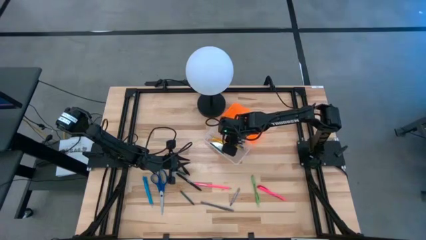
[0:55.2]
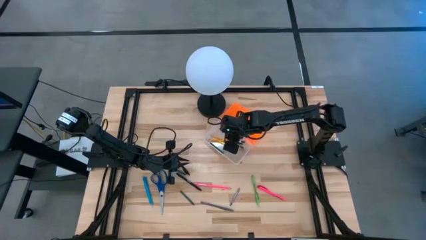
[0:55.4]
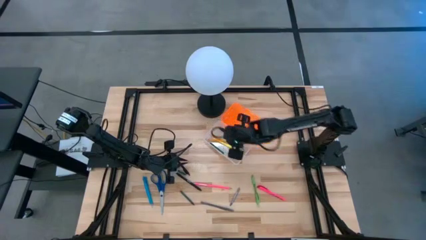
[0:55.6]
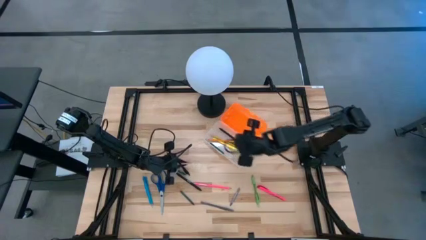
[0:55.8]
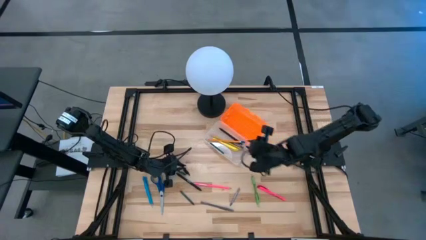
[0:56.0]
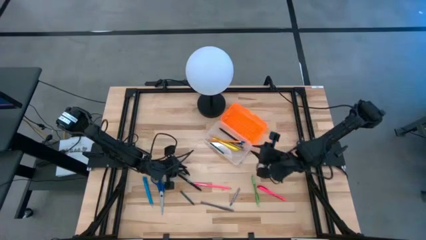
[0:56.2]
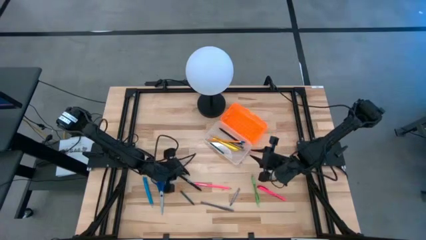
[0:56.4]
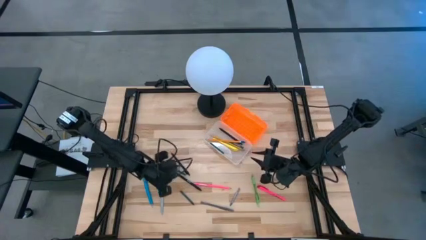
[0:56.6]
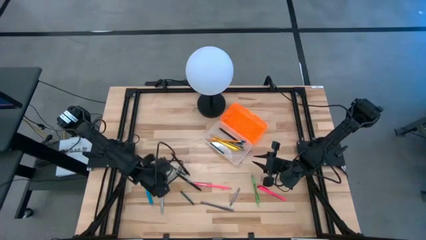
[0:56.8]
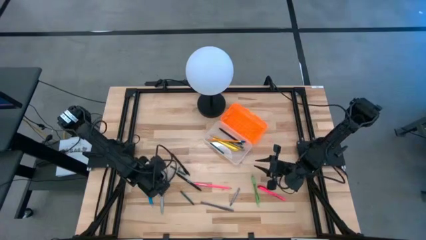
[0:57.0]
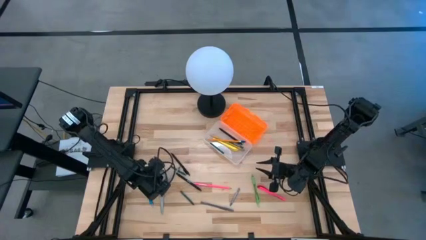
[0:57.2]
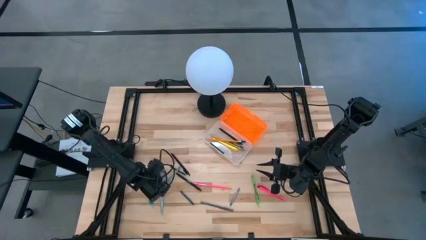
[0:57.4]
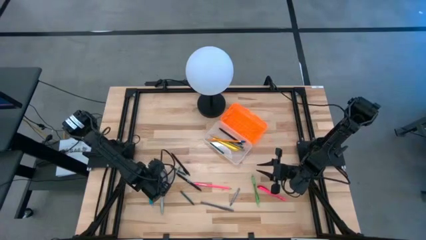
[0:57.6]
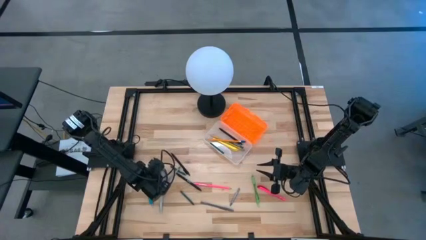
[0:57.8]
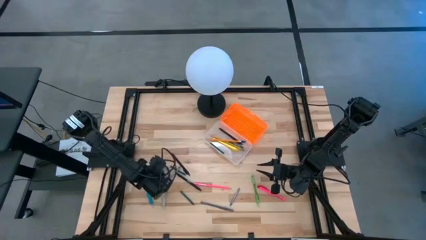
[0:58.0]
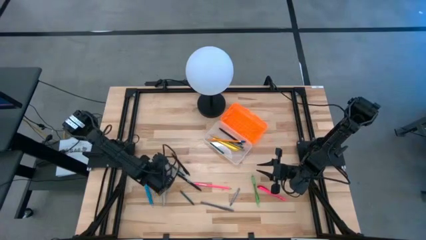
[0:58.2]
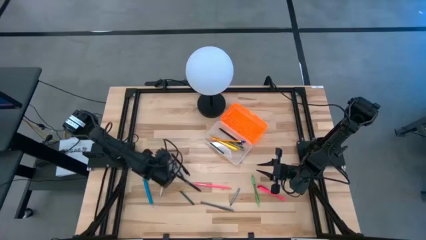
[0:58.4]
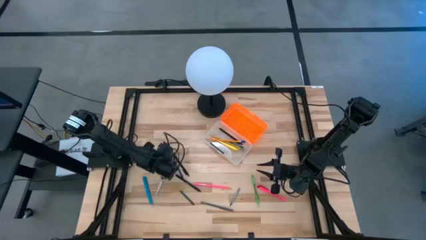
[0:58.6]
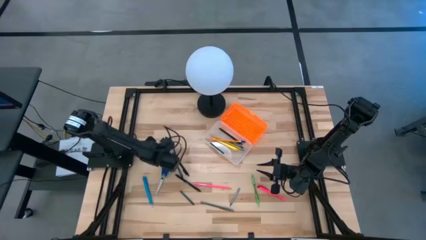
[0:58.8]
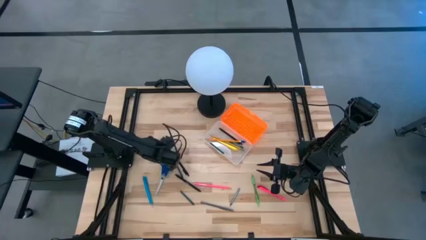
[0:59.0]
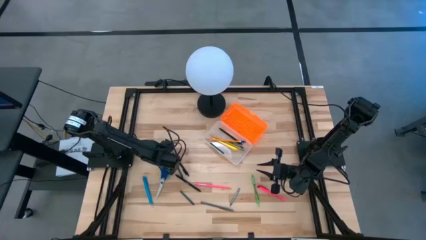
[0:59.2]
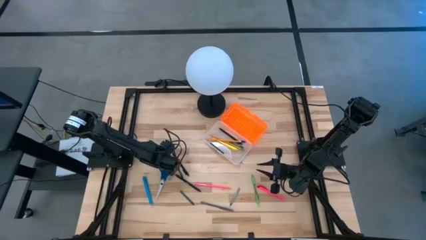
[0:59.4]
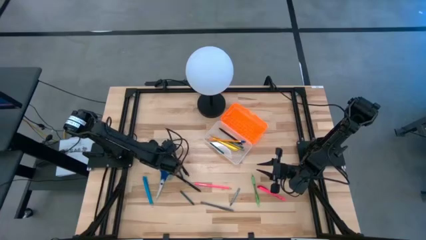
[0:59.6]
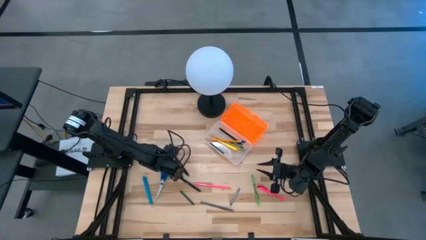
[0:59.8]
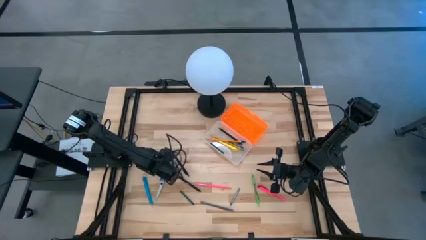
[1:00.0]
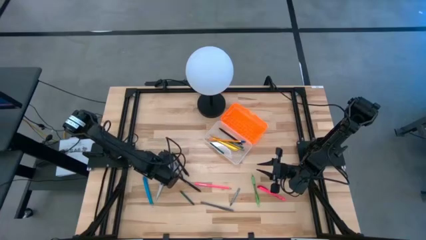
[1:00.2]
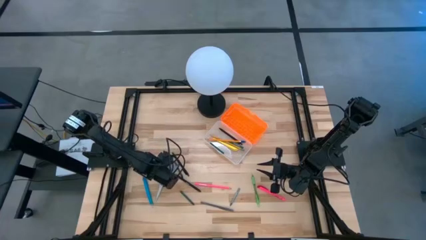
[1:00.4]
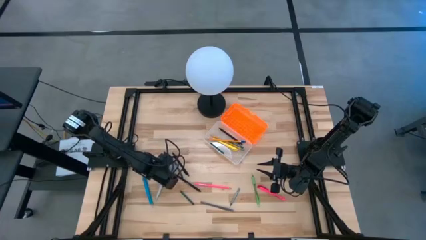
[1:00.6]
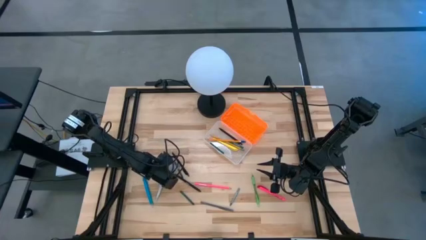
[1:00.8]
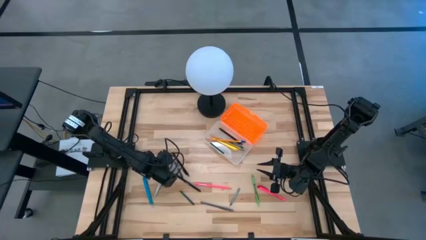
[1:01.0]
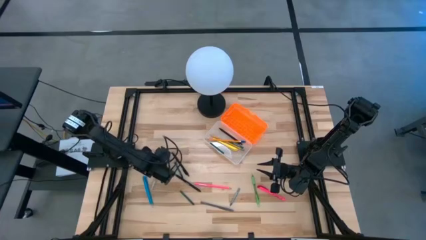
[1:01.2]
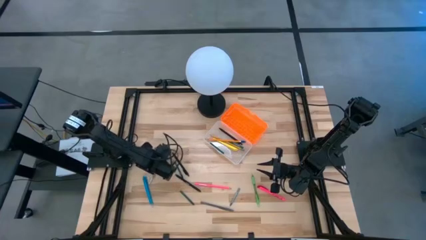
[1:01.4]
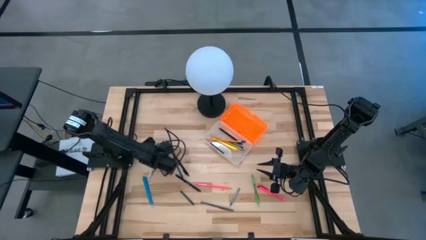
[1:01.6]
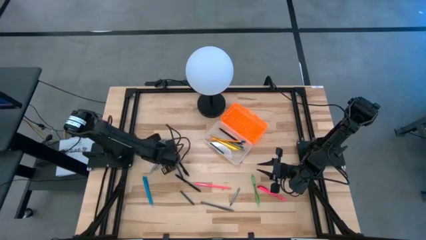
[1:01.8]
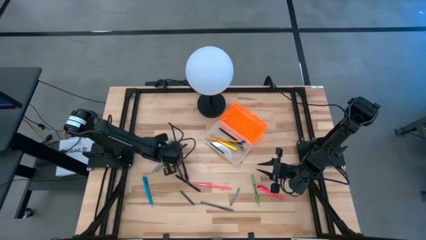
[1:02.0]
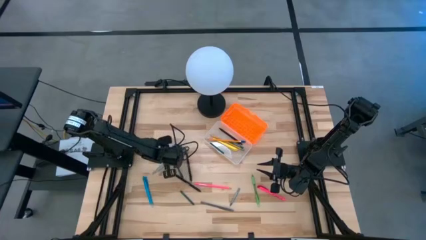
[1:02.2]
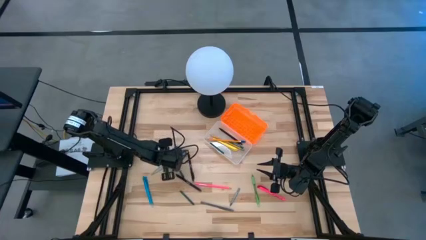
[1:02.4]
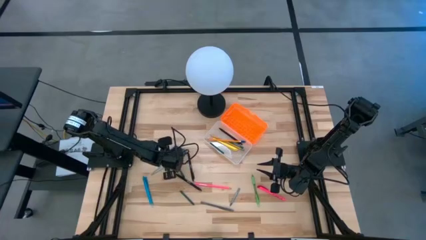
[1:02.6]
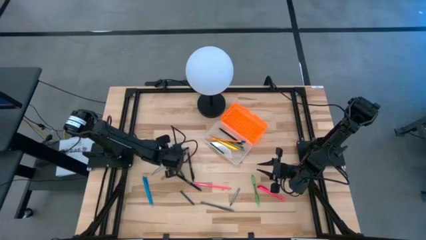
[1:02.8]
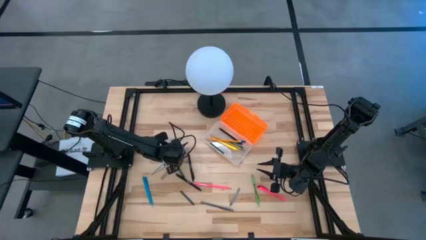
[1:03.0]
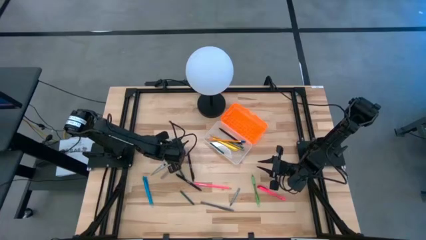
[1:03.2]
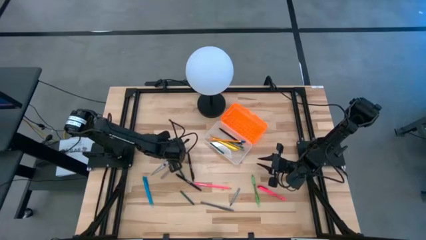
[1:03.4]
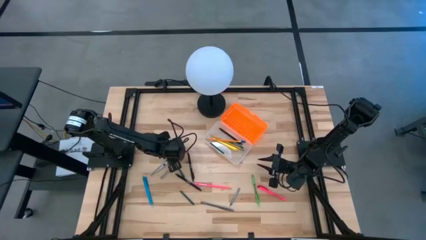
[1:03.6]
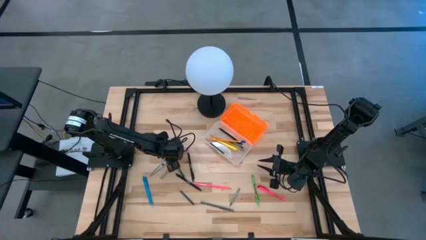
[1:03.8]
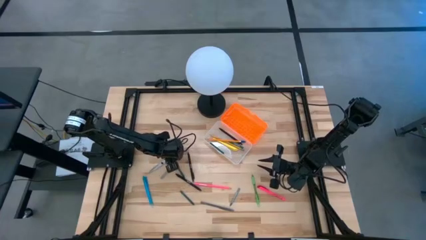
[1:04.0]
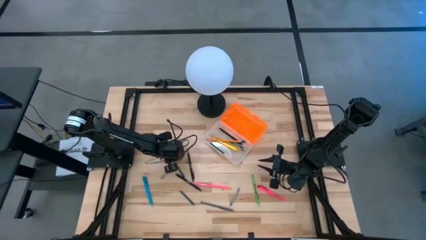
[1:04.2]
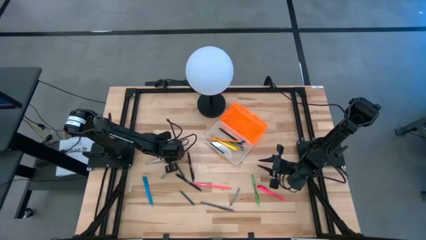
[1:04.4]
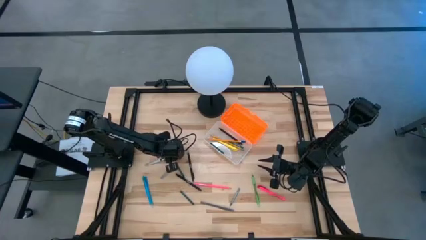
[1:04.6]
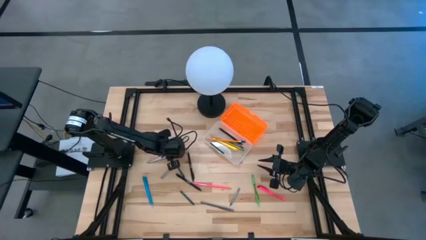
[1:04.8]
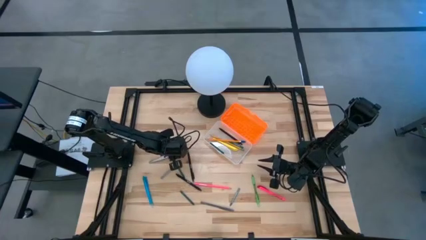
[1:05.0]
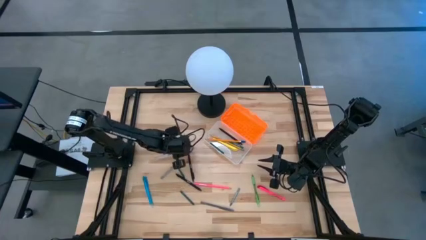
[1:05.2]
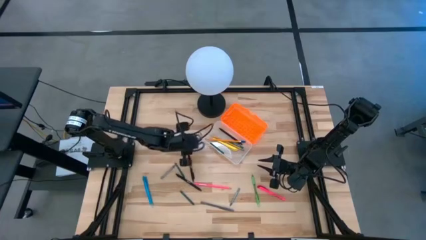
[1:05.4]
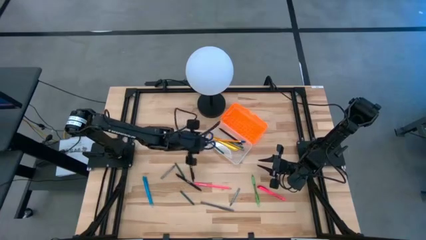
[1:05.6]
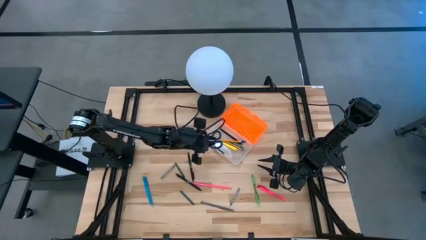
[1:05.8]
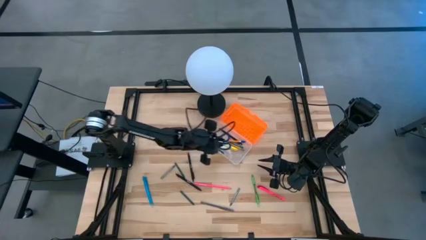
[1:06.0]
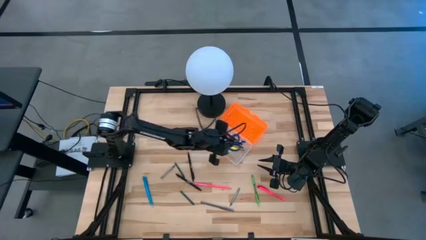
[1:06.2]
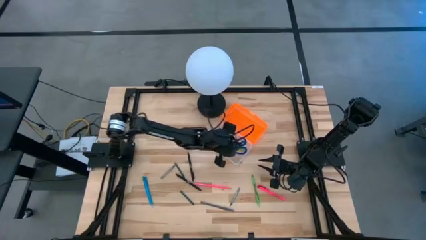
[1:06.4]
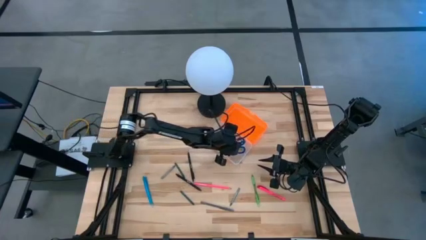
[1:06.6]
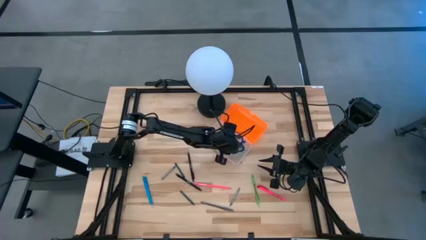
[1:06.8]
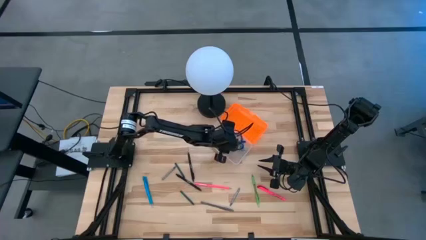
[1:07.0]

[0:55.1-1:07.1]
Task: Pick & place school supplies into a supply box
Put the blue scissors into the orange supply box

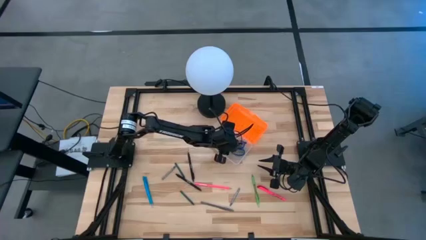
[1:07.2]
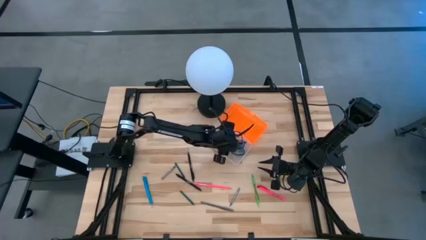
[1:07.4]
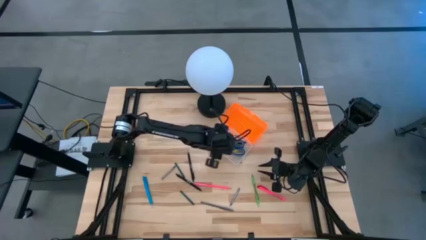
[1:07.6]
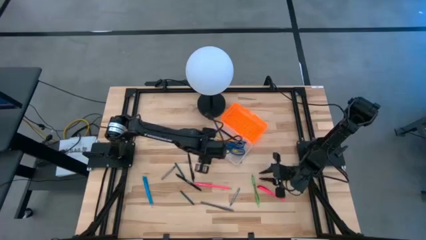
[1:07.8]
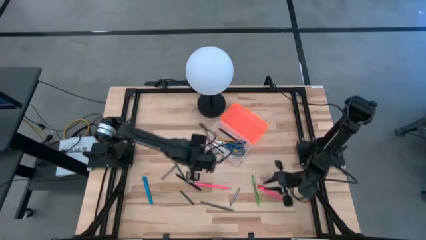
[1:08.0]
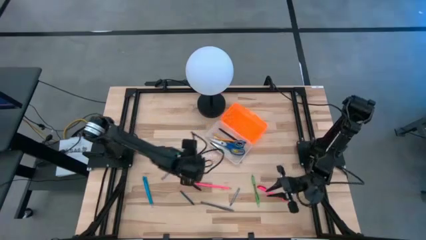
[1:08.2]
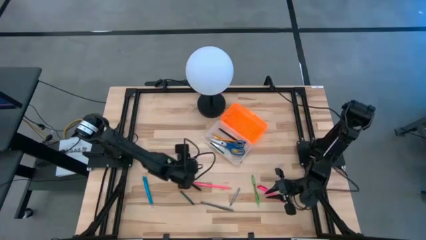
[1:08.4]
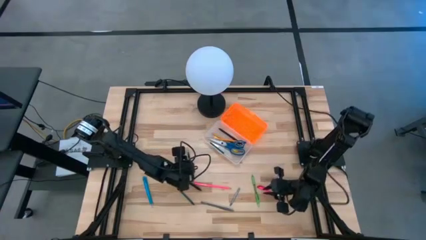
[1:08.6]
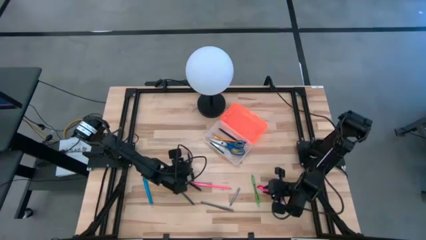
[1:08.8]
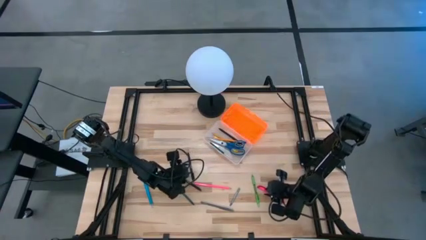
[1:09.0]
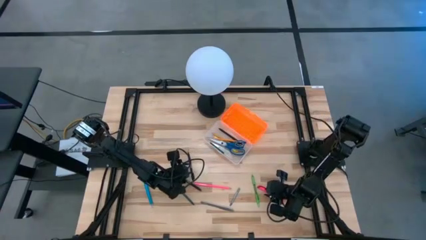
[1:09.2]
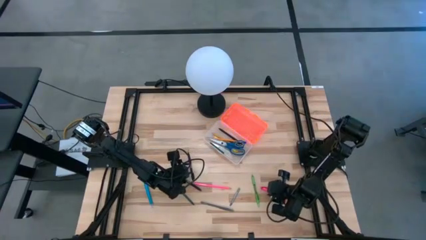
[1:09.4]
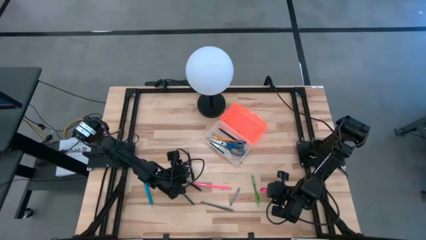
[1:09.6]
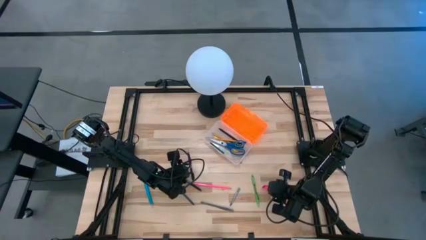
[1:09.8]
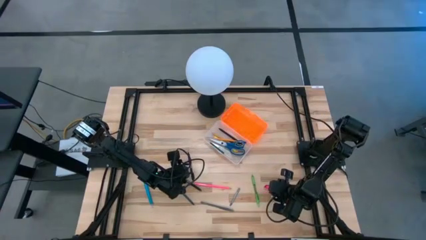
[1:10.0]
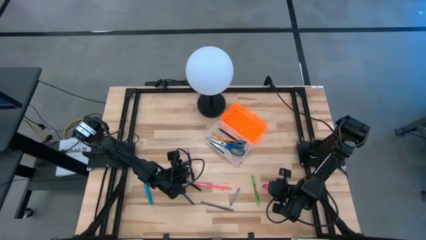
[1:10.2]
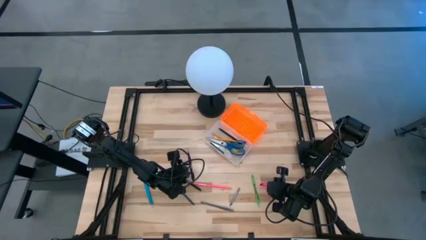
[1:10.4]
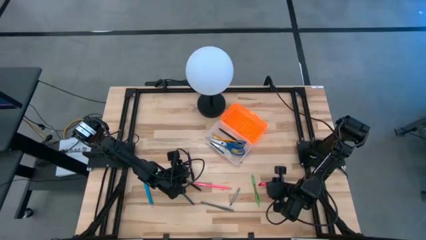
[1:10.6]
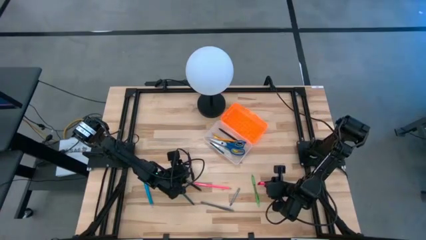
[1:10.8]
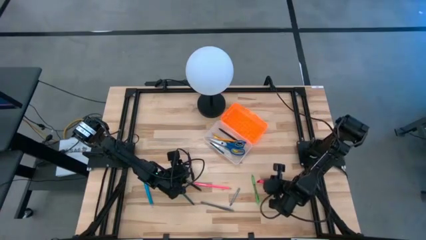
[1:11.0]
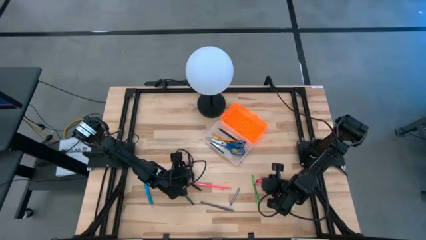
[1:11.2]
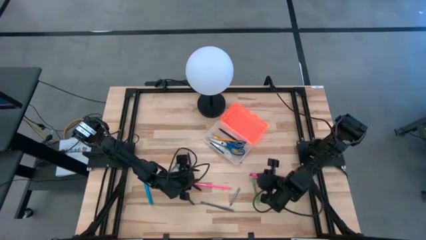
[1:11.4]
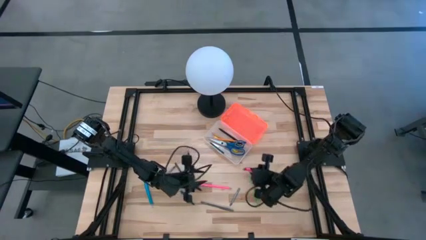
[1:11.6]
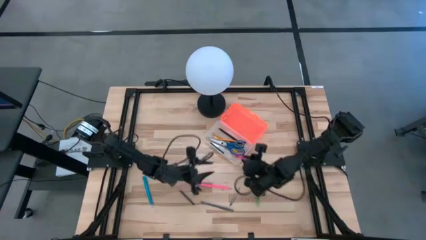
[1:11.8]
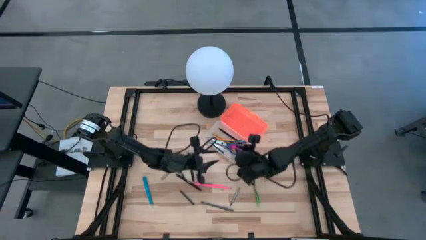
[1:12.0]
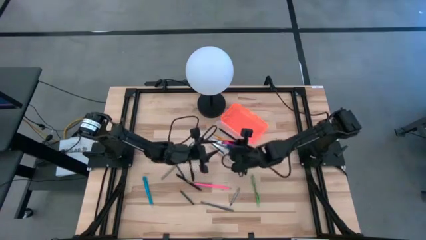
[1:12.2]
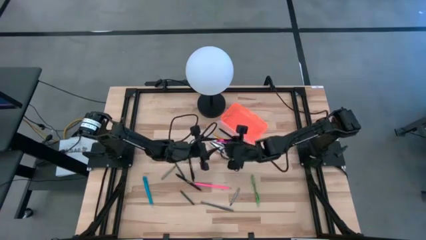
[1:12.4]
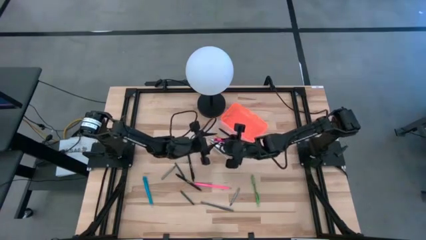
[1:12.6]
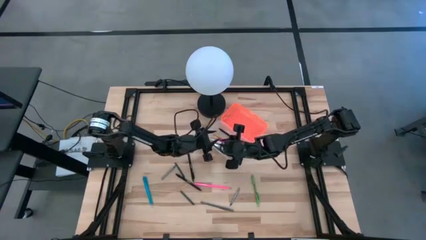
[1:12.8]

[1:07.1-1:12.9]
Put the pink pen into the orange supply box
